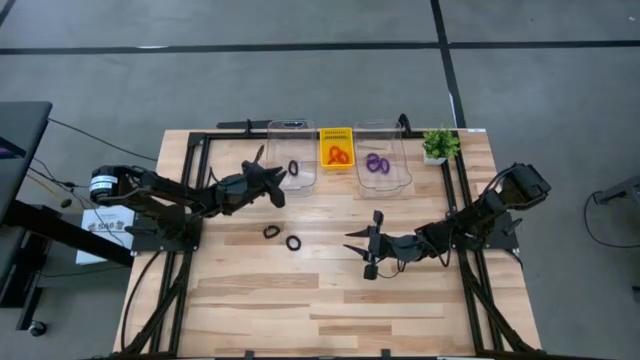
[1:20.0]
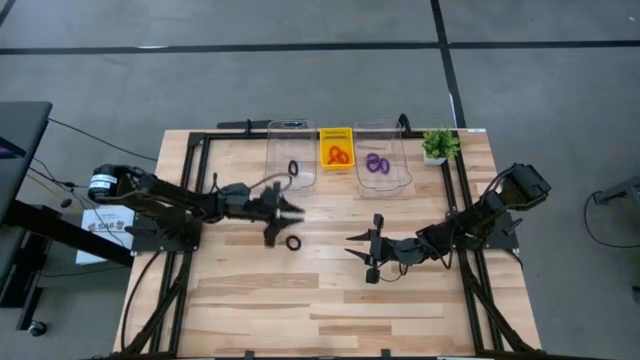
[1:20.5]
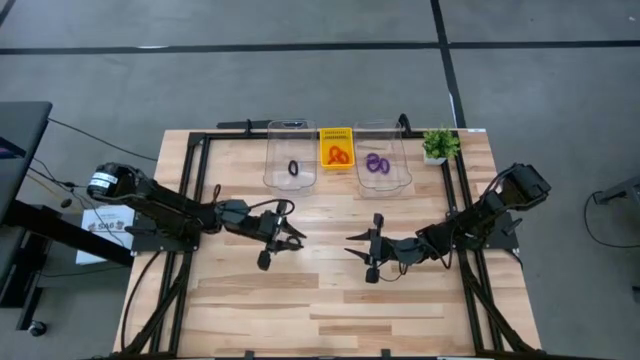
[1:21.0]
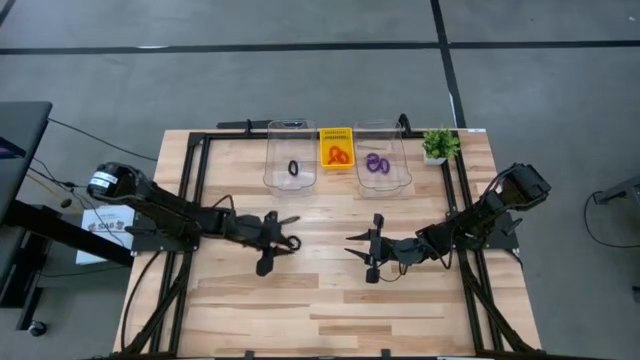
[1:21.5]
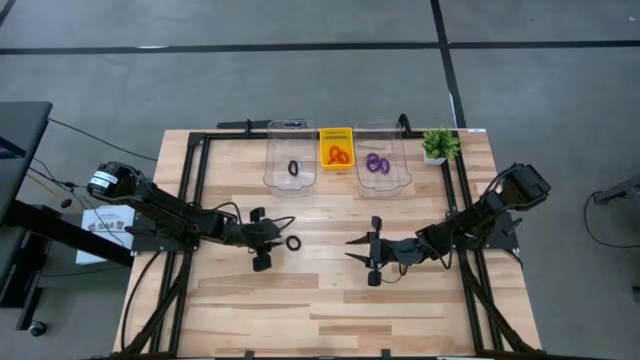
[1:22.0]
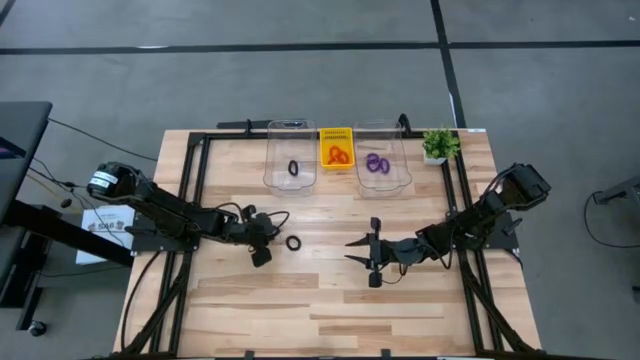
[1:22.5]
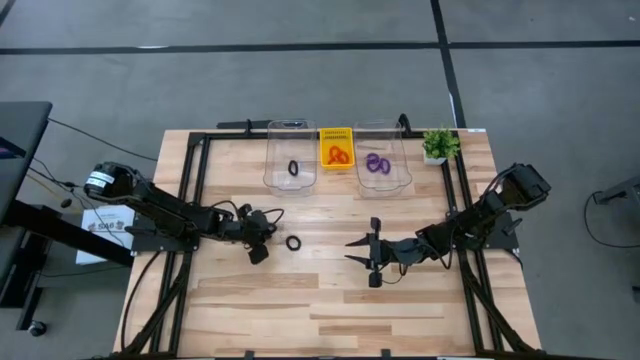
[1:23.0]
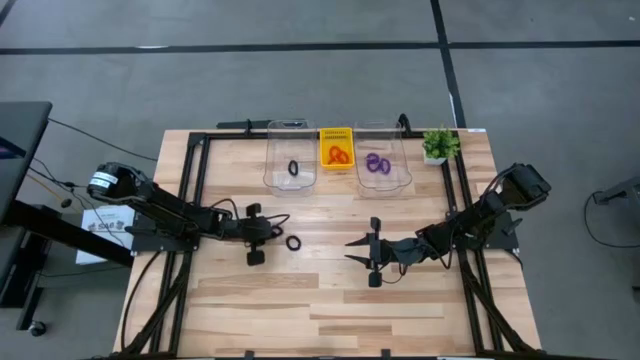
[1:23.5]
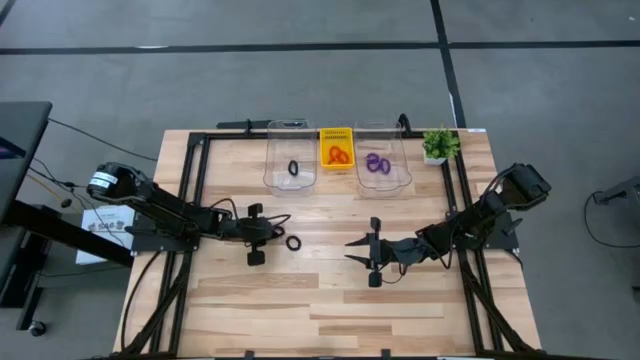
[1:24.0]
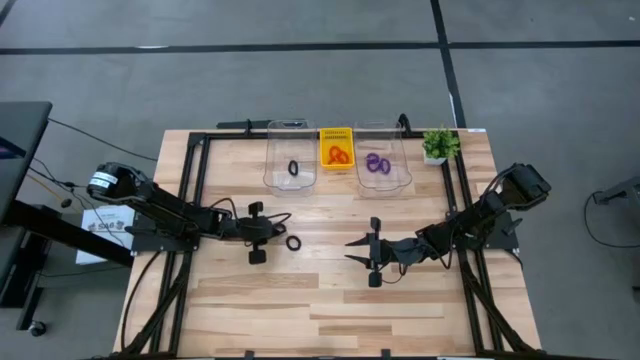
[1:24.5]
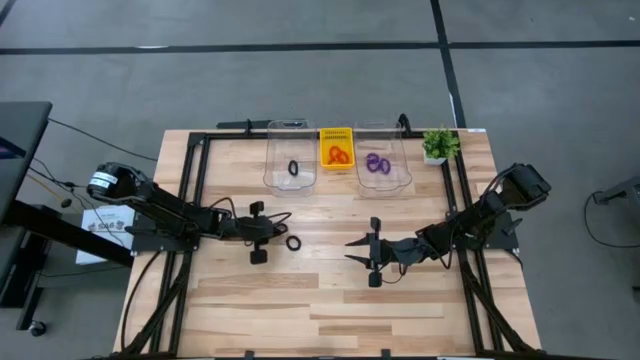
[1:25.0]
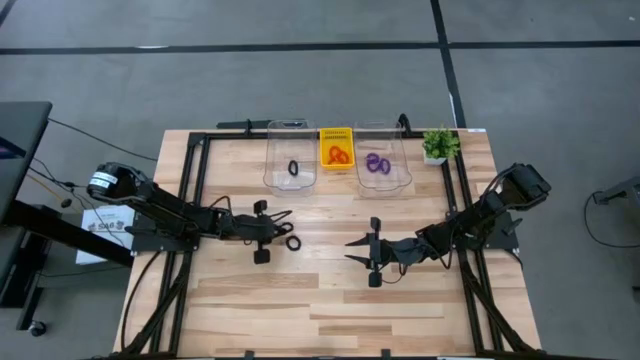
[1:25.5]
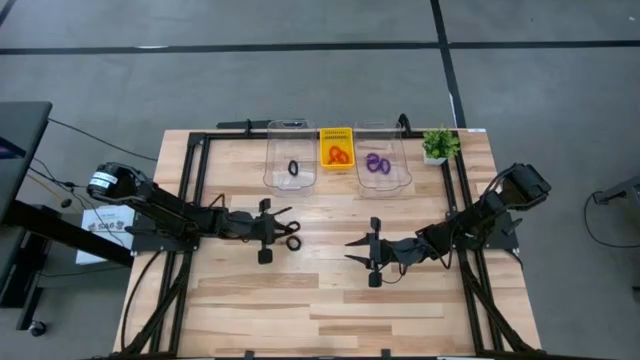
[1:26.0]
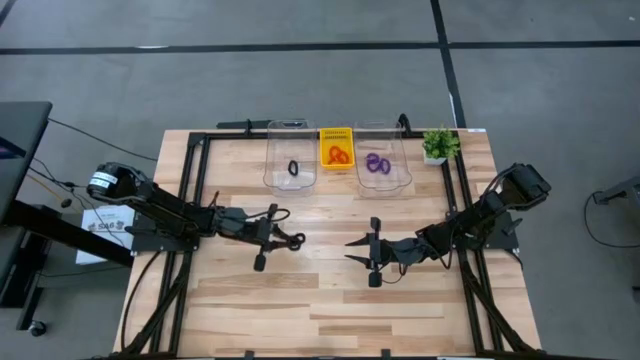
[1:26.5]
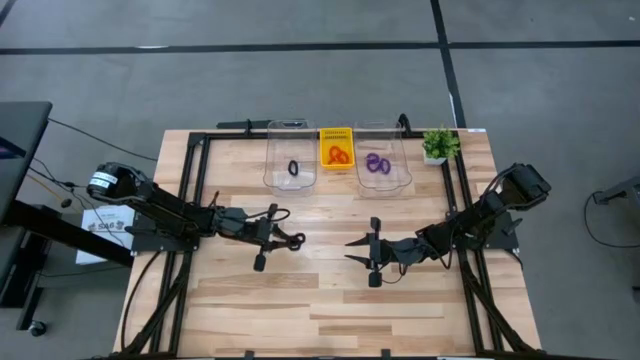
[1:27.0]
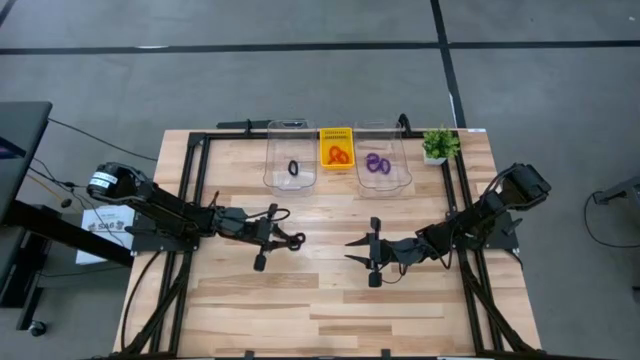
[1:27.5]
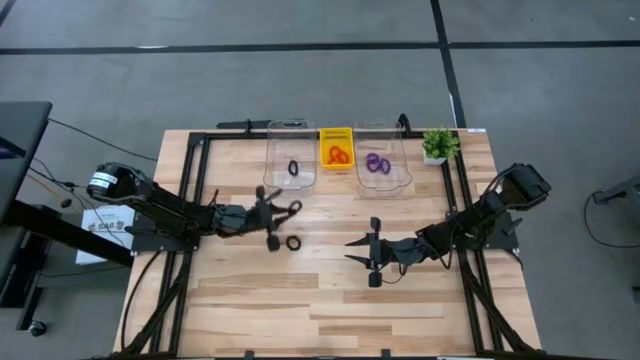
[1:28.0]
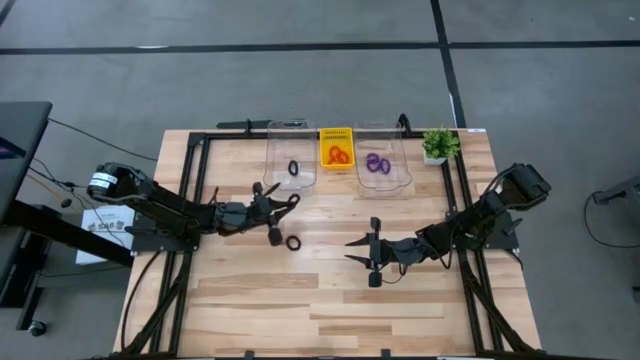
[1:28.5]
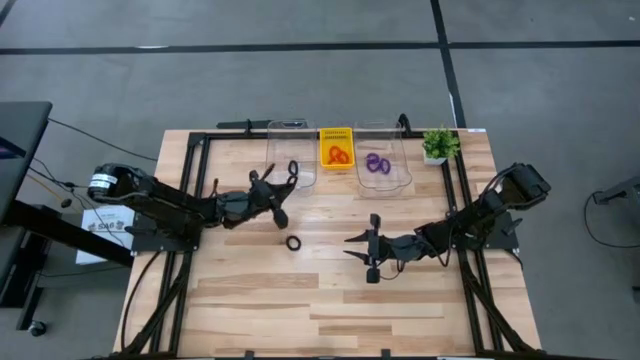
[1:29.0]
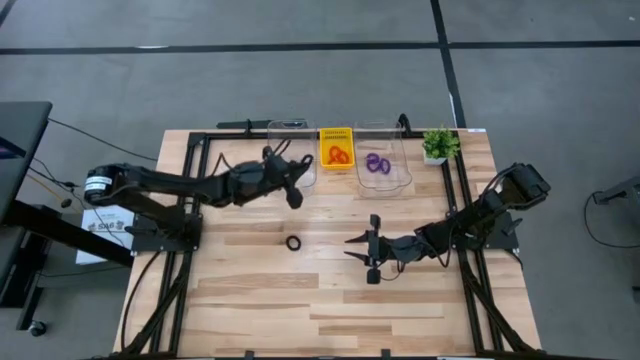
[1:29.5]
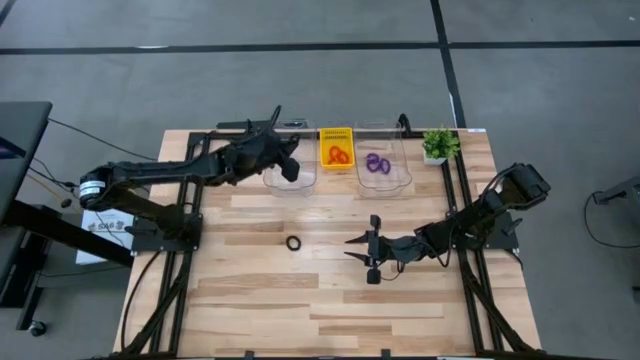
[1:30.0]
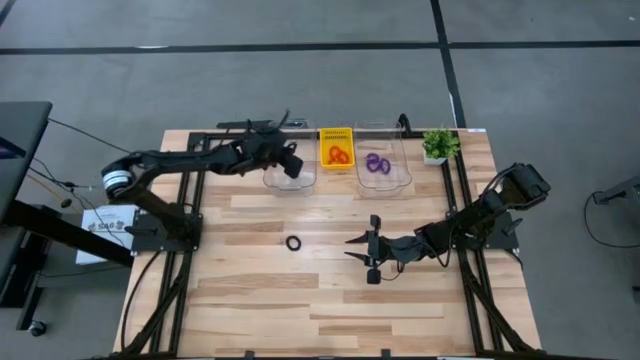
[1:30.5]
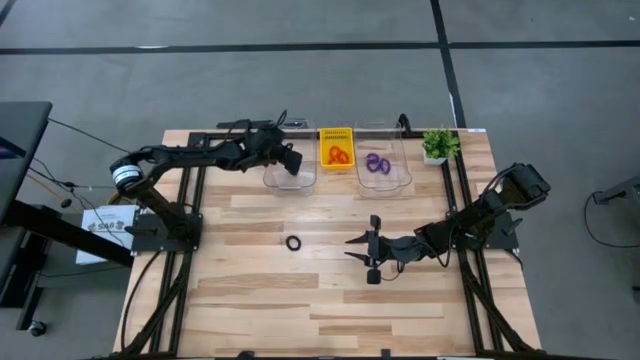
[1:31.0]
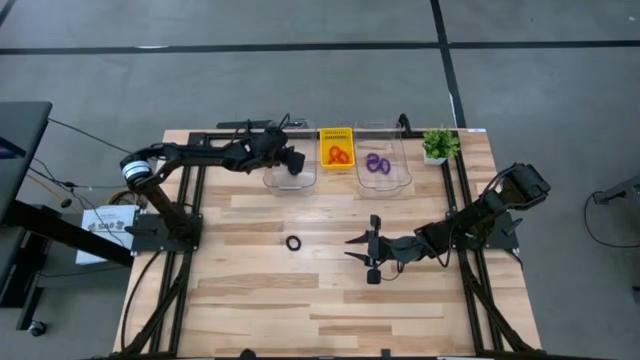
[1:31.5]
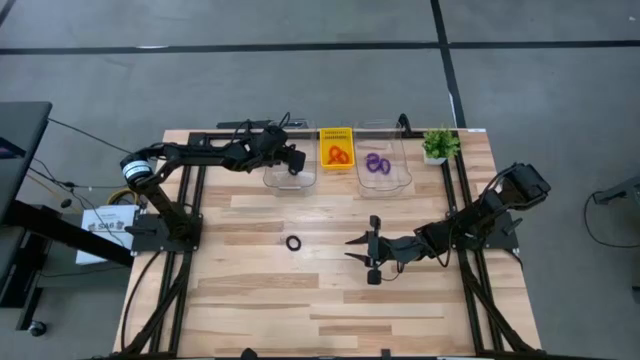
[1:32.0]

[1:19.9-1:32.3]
Task: Sort spring keychains
Put the left black spring keychain into the left transparent bin

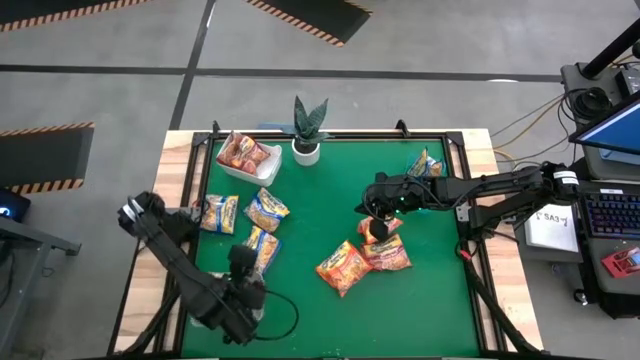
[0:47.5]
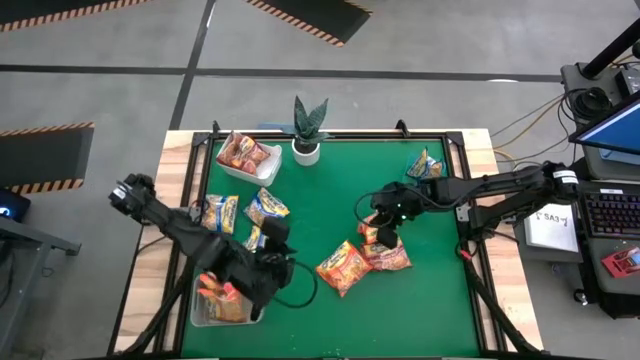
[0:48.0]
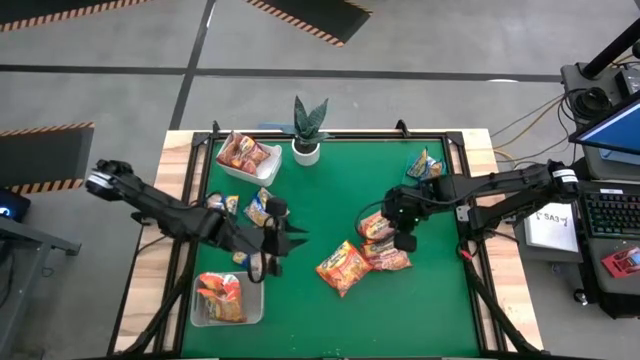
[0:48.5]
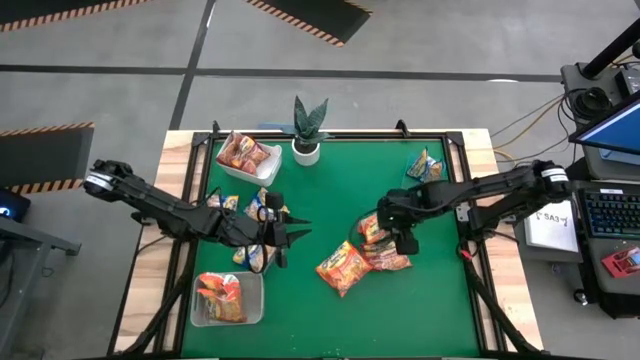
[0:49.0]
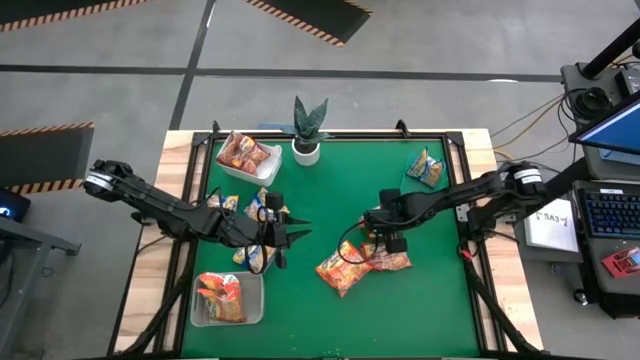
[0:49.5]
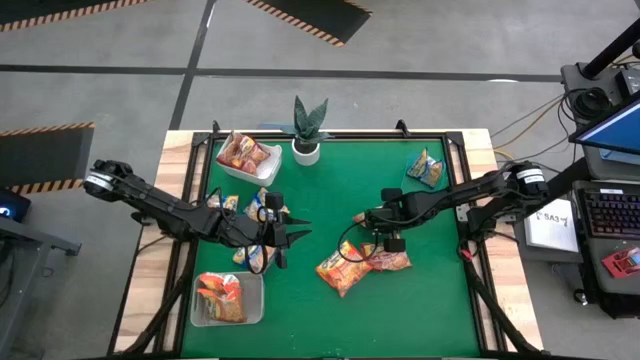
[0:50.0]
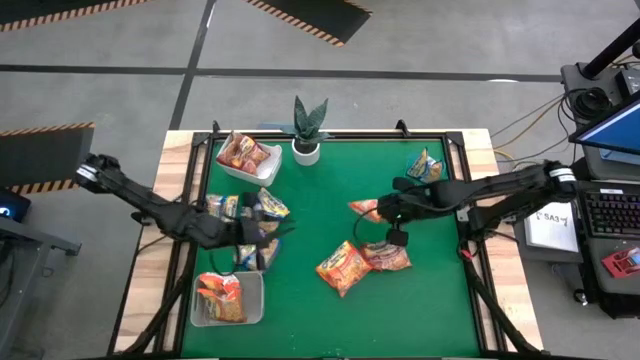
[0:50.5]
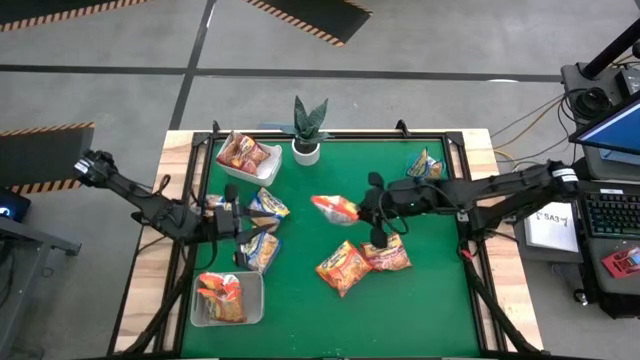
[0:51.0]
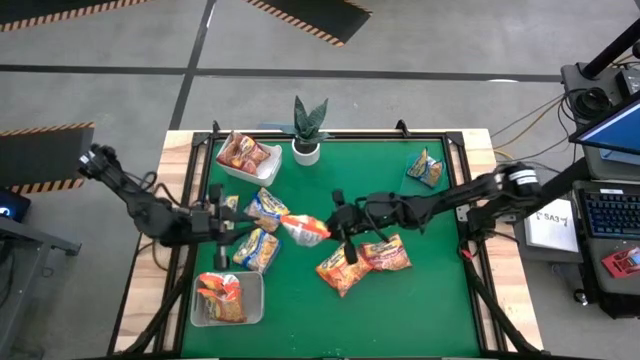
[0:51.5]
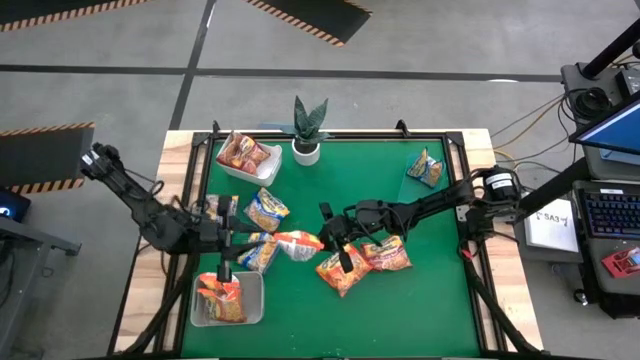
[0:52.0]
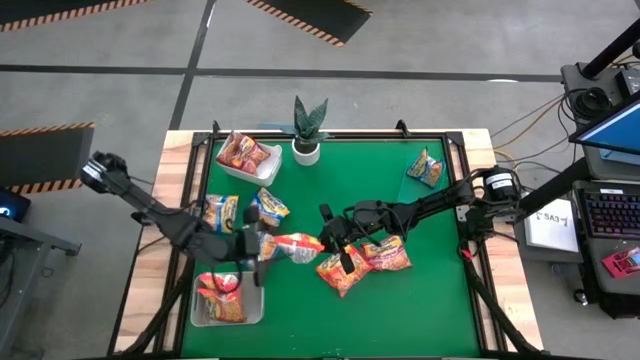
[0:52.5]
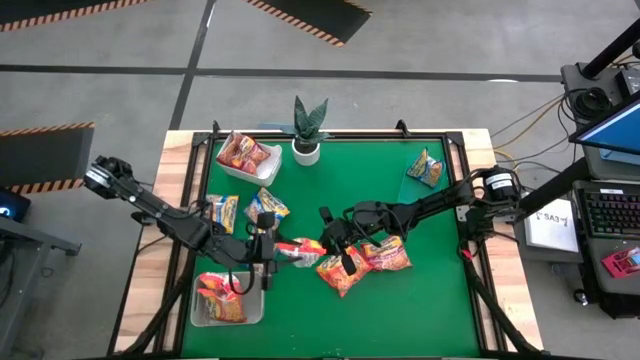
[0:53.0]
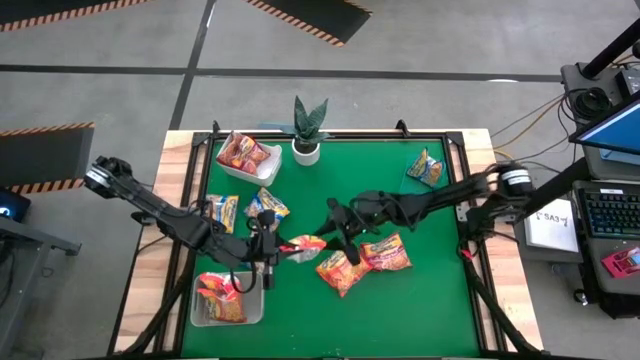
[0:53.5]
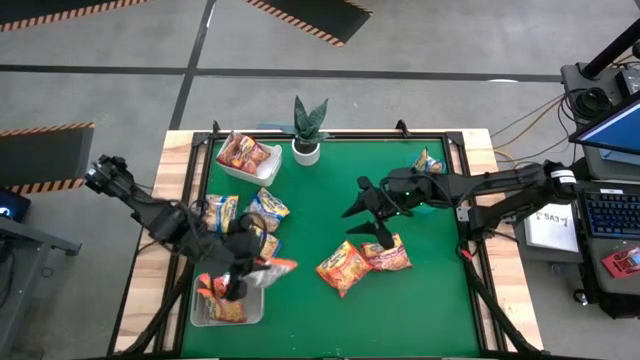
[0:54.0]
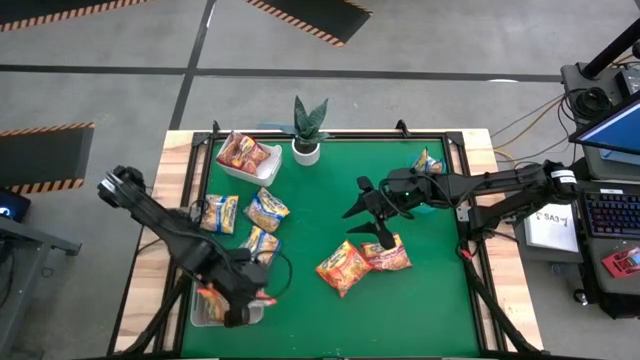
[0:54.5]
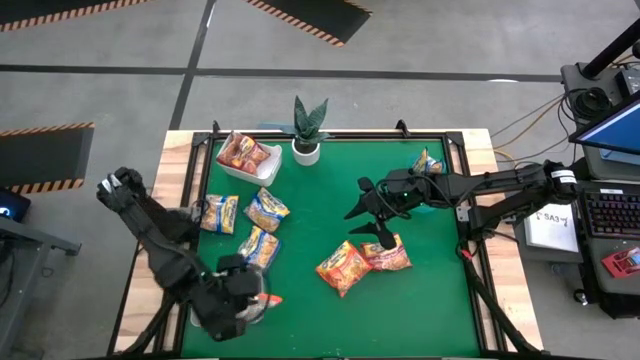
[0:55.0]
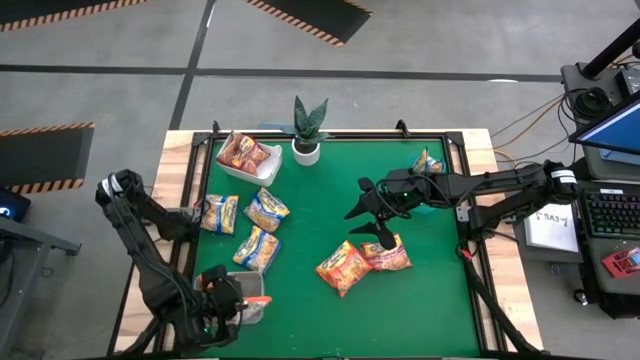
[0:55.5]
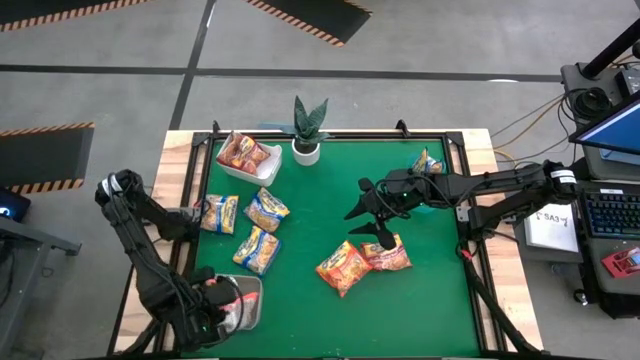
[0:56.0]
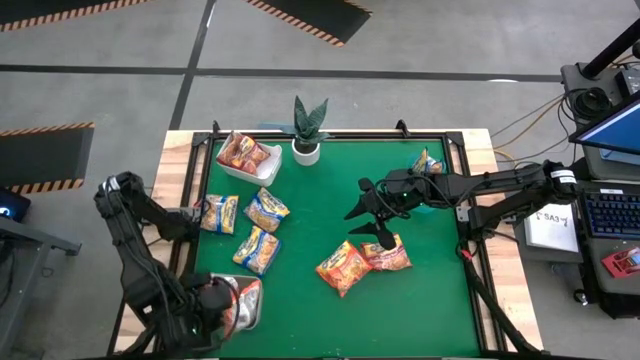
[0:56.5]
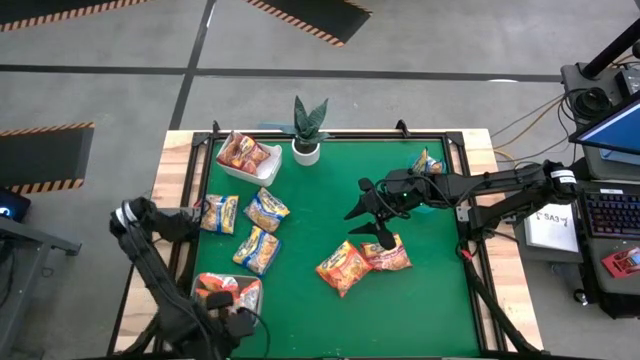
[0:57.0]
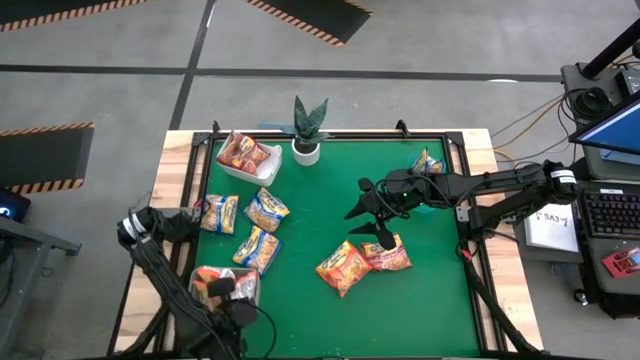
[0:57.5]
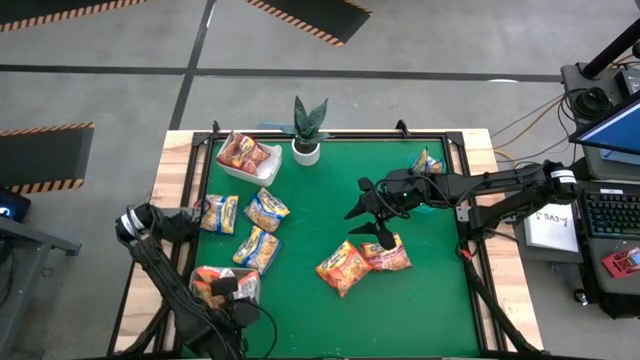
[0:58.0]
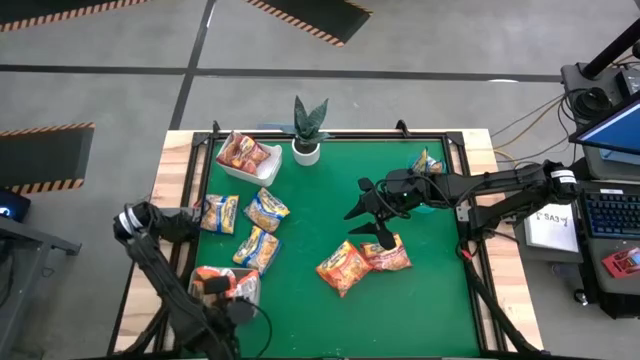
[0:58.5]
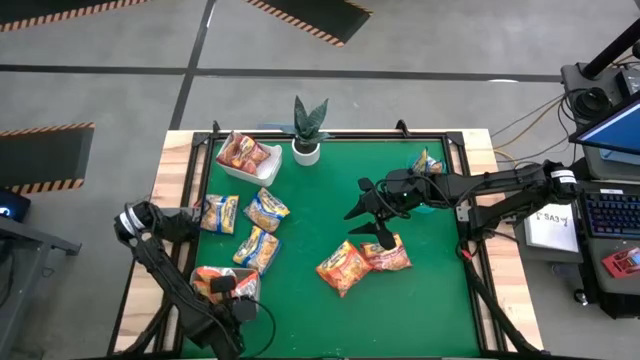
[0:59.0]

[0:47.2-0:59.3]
Task: Sort Maruchan noodles
Put the orange noodle pack into the gray bin
